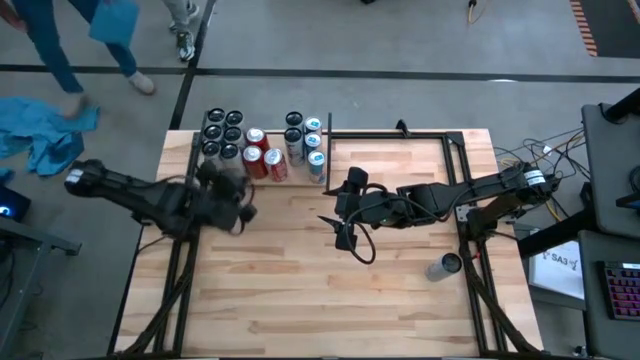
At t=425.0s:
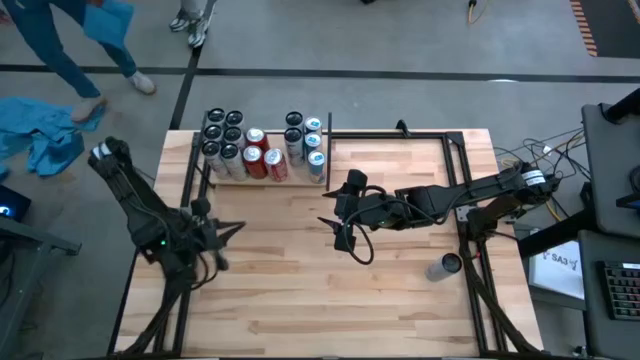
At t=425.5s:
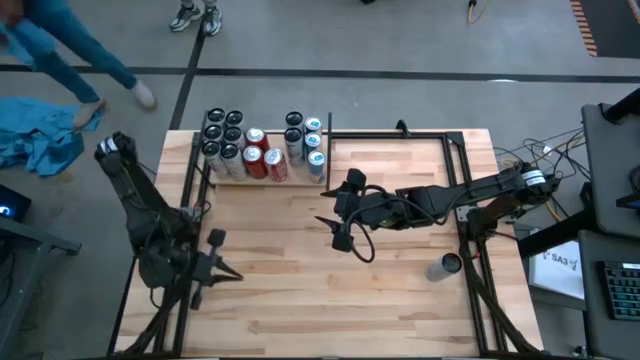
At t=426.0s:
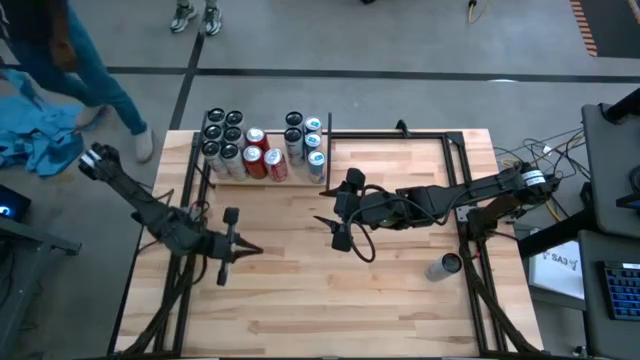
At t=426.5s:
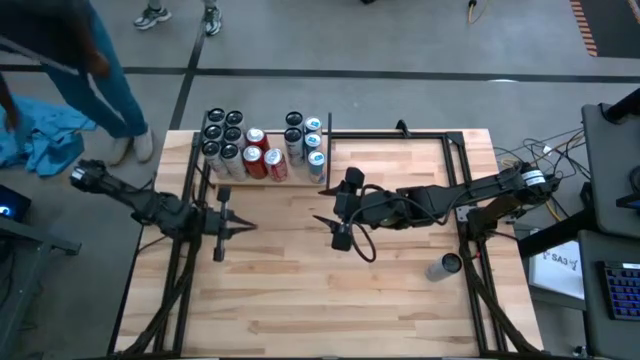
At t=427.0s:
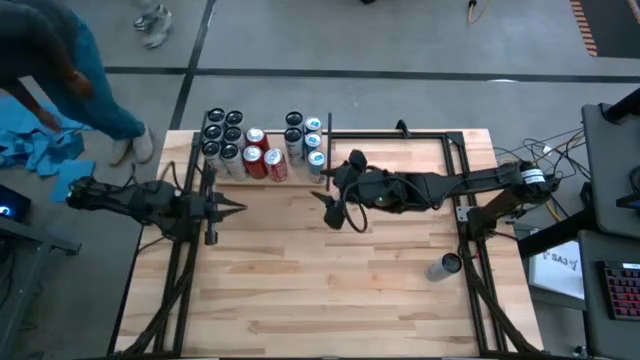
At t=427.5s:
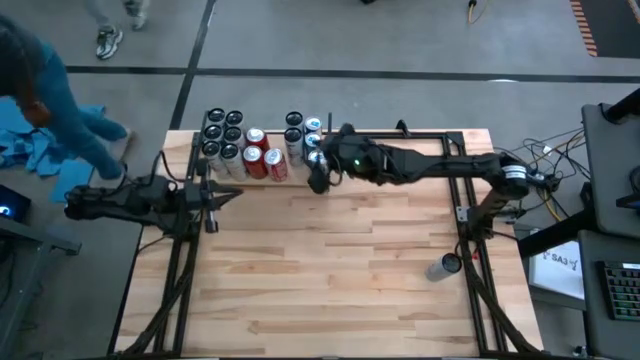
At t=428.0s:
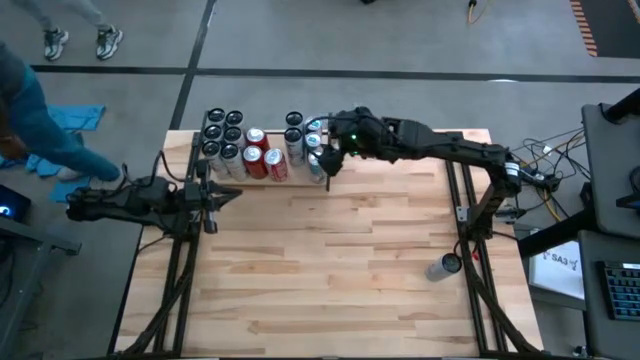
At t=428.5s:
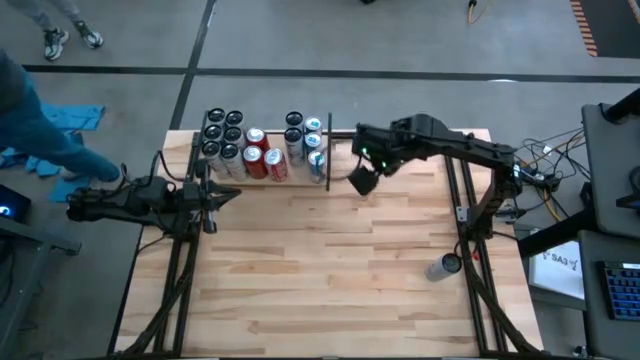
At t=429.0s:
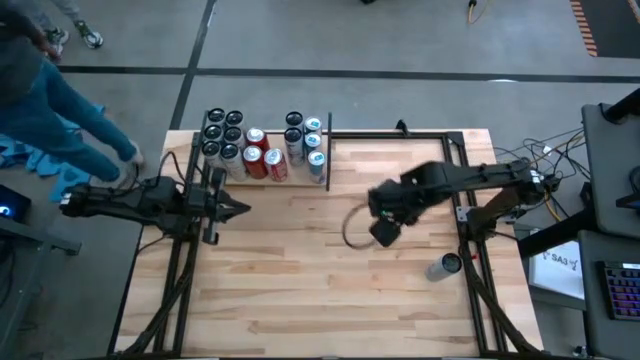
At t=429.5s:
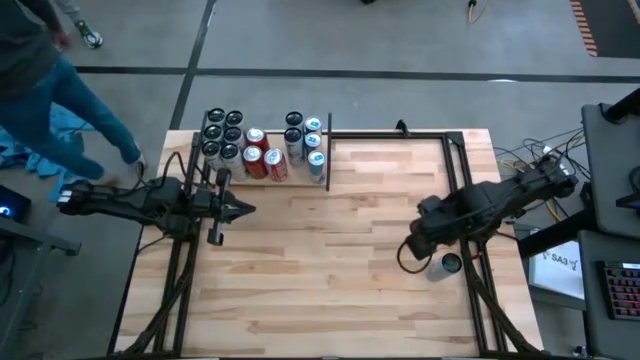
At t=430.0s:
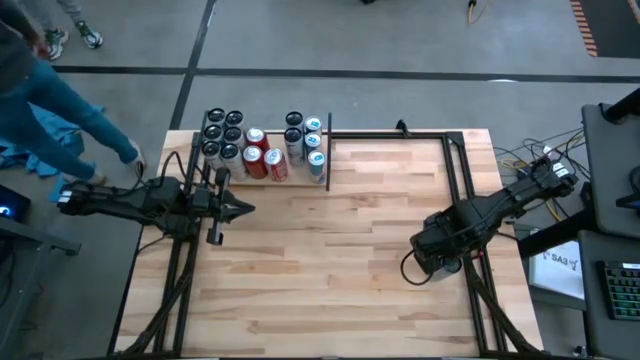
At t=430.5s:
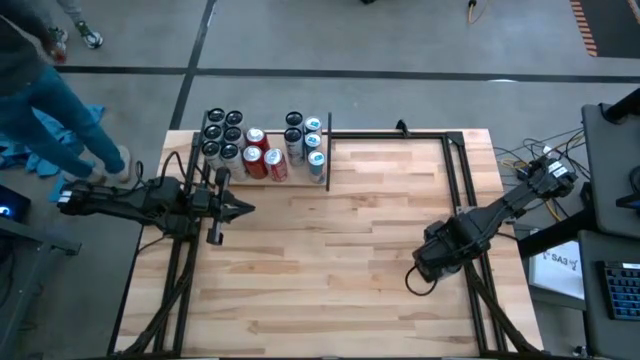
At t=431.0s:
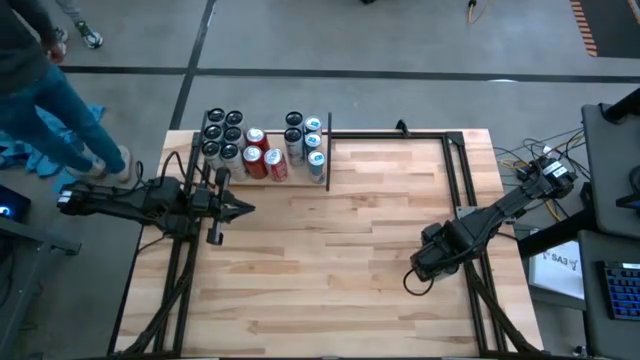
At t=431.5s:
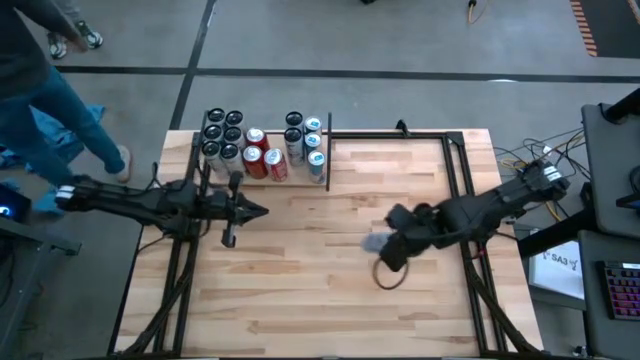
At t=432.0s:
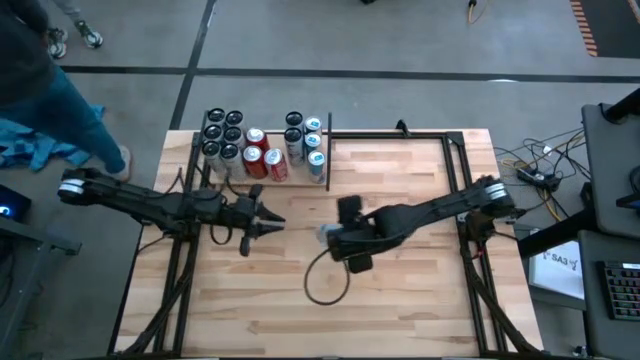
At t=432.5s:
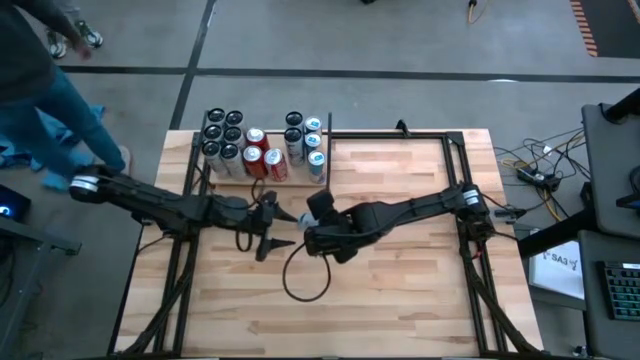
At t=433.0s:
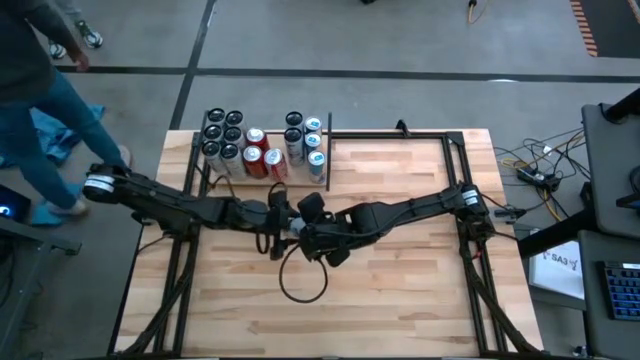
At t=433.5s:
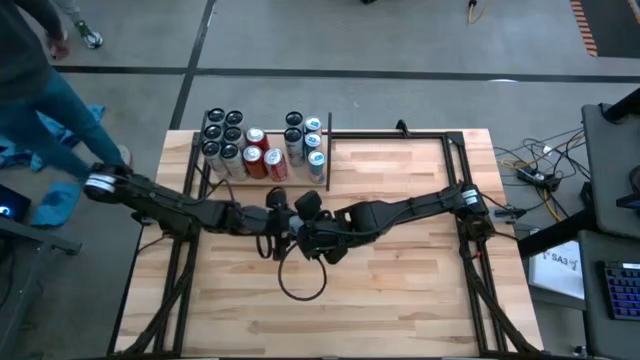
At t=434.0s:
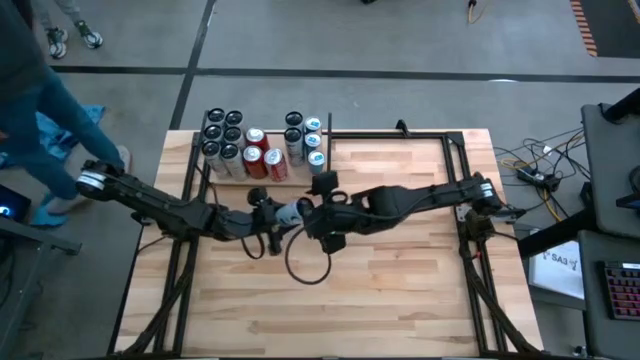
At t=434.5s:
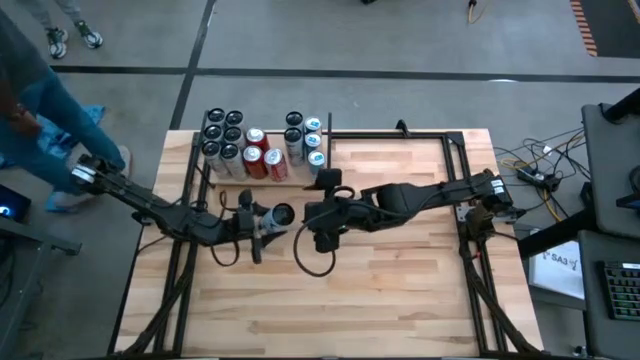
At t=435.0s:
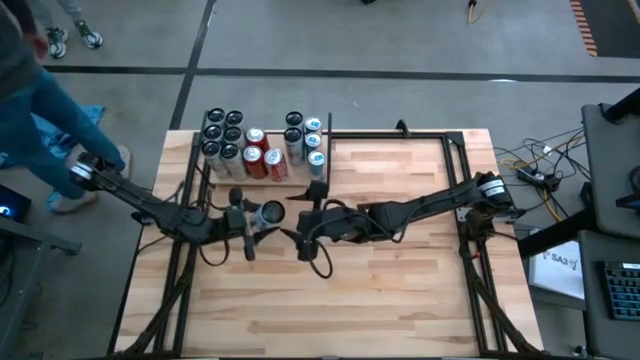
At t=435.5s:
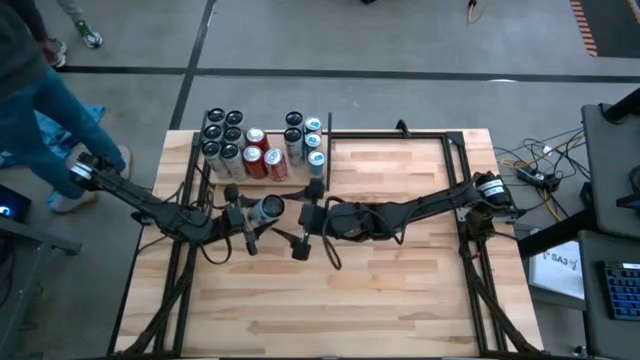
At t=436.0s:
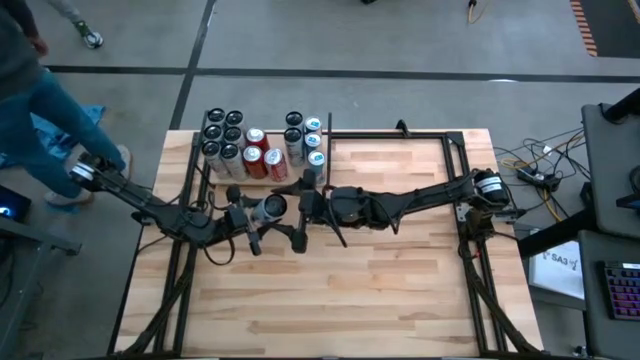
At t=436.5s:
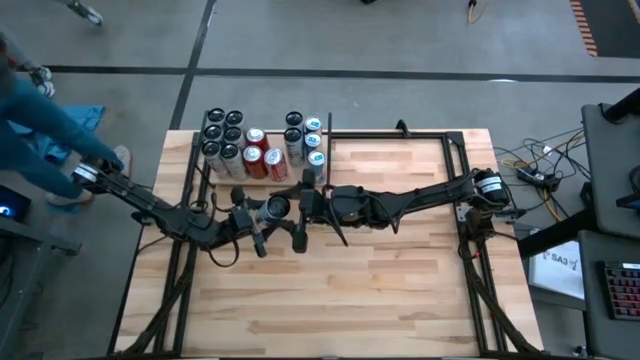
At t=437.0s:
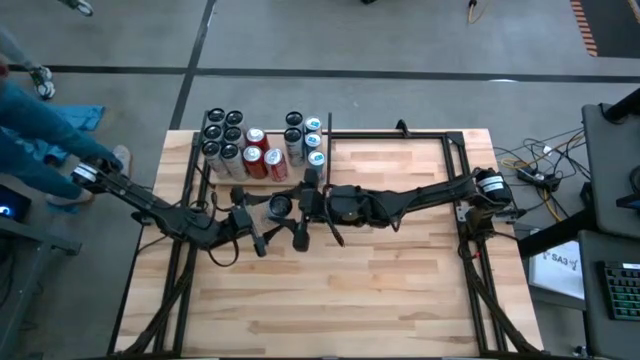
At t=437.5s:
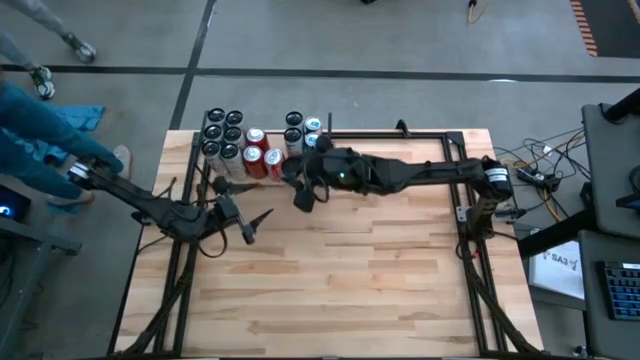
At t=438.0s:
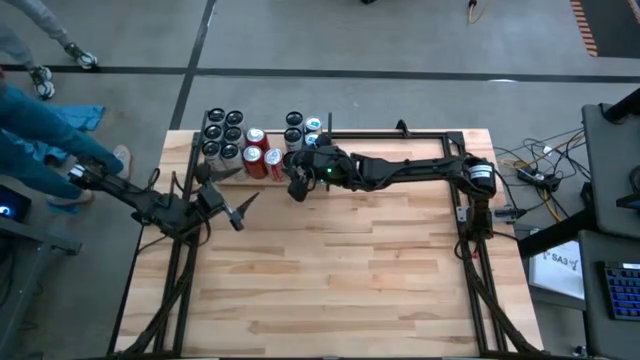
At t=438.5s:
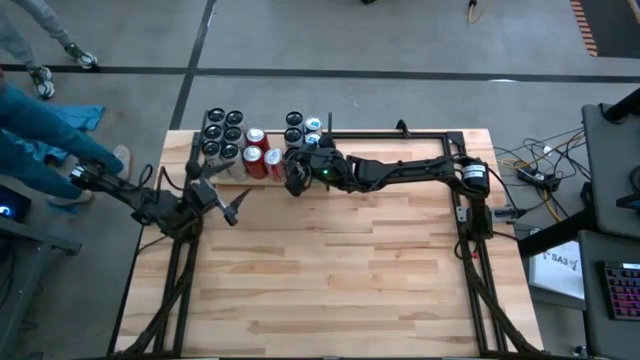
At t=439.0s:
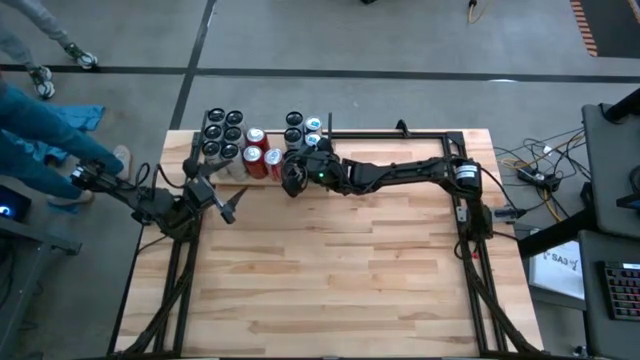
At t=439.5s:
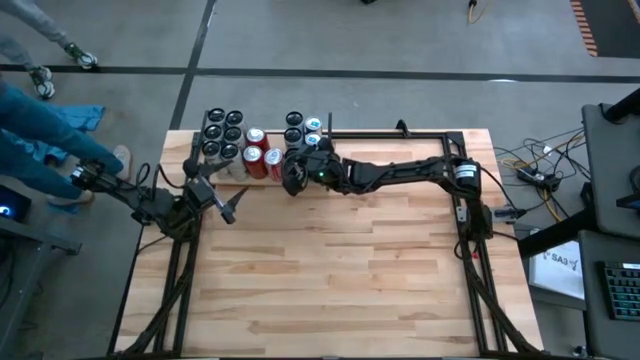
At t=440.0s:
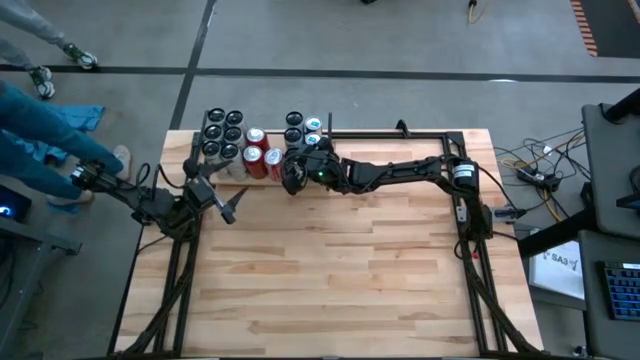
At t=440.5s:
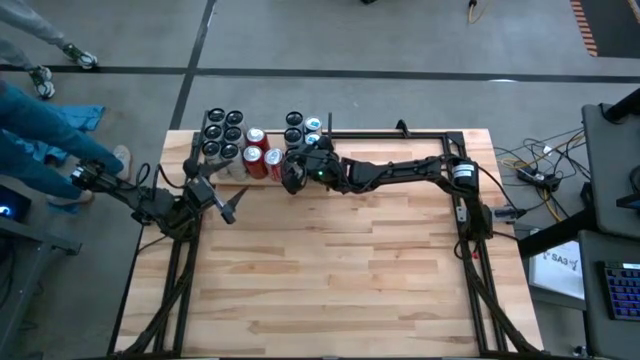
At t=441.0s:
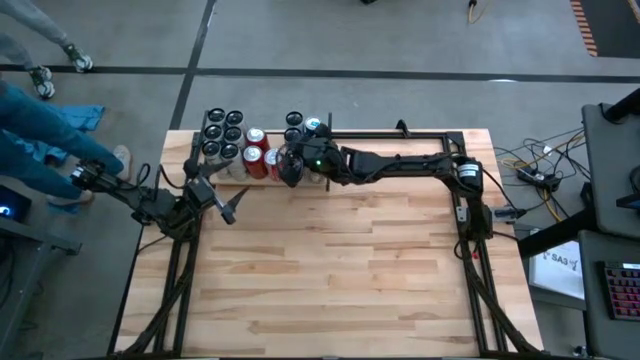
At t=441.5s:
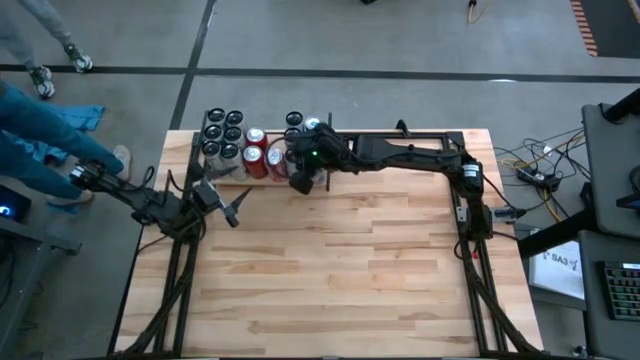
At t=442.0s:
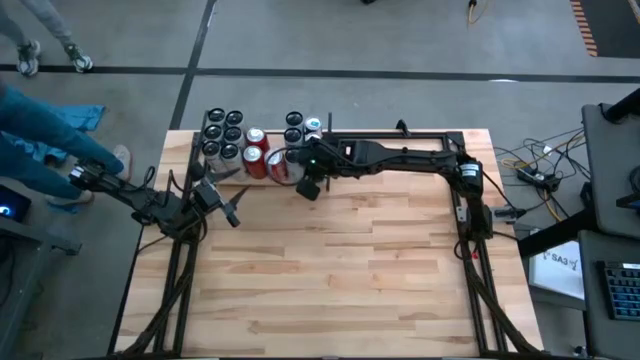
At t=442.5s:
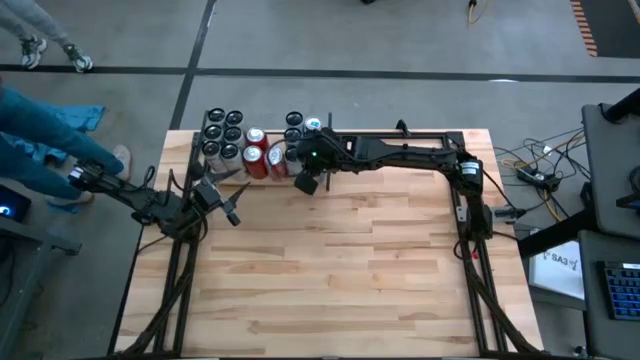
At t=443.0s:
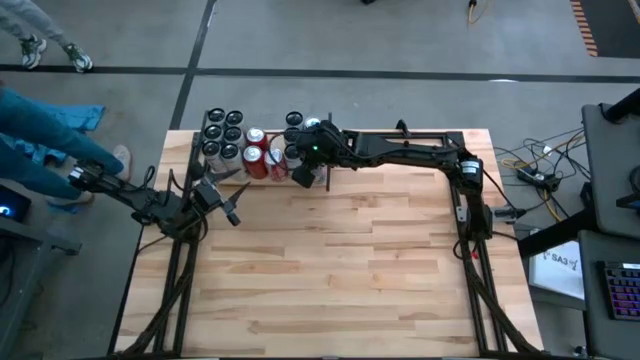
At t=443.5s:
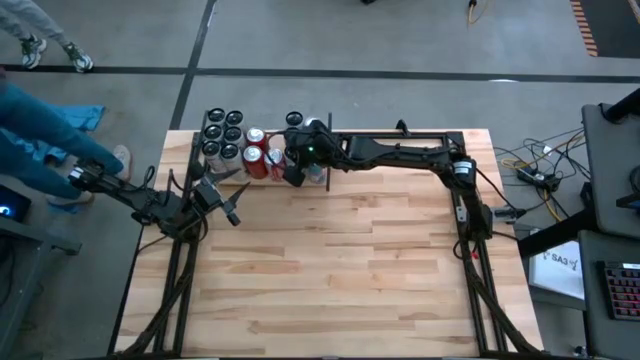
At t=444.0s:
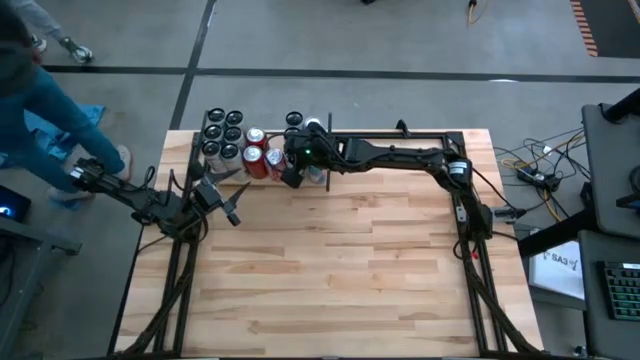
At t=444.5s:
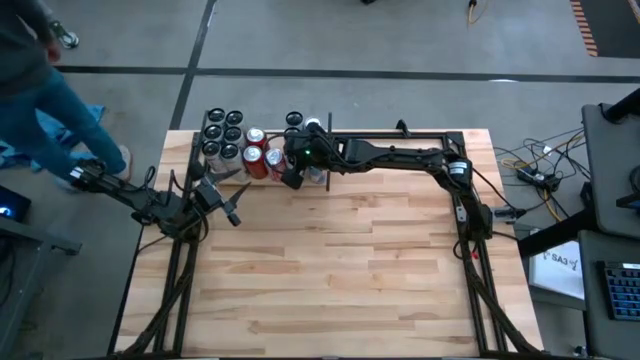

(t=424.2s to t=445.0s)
Task: Place canned beverage on shelf
Put the white and blue soda can on the shelf aligned with the other white and blue soda cans
